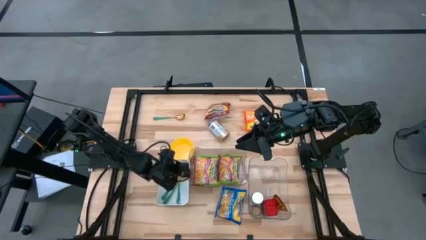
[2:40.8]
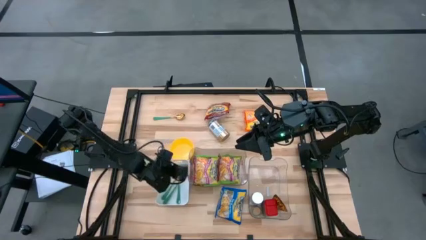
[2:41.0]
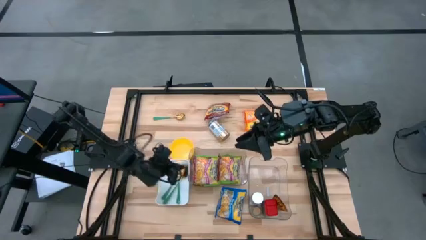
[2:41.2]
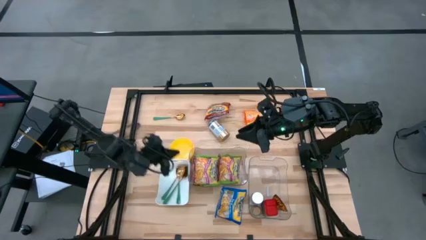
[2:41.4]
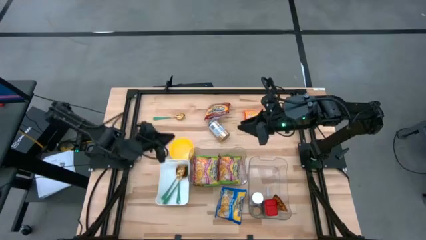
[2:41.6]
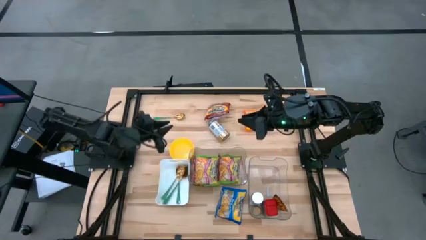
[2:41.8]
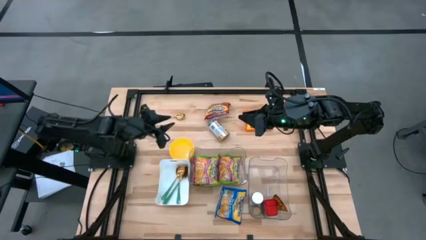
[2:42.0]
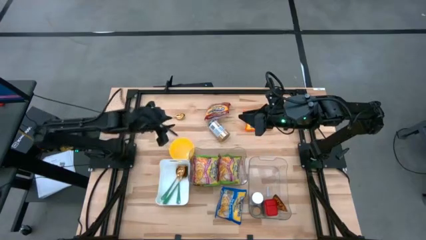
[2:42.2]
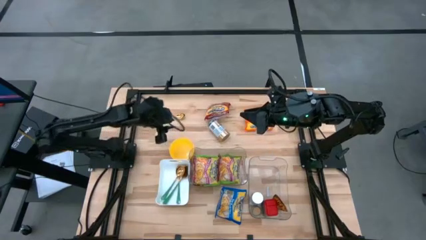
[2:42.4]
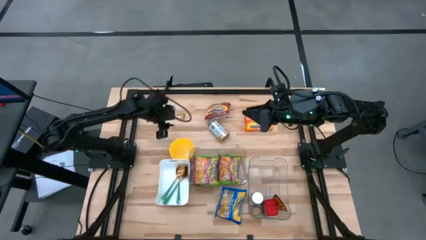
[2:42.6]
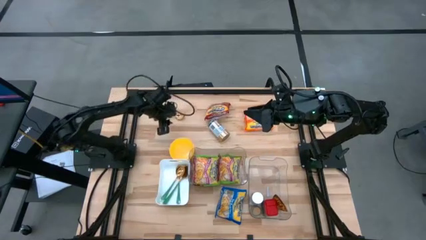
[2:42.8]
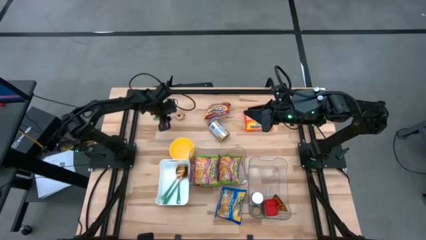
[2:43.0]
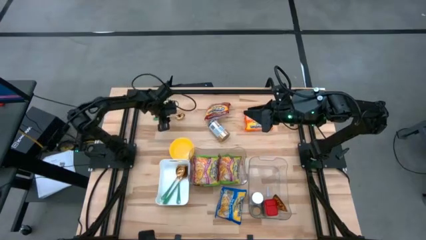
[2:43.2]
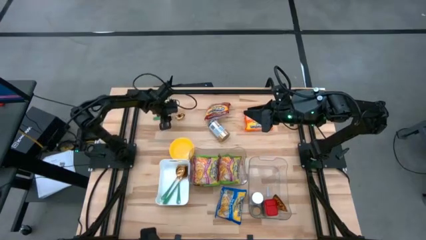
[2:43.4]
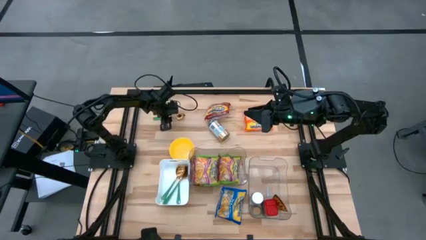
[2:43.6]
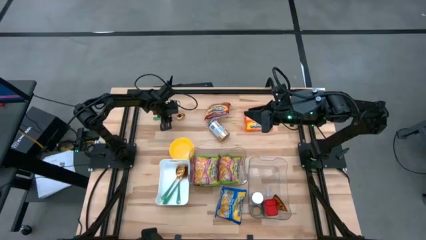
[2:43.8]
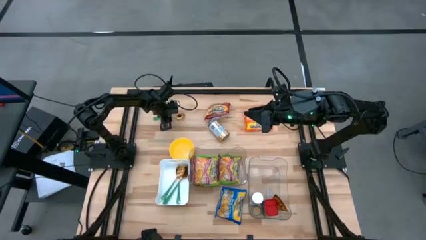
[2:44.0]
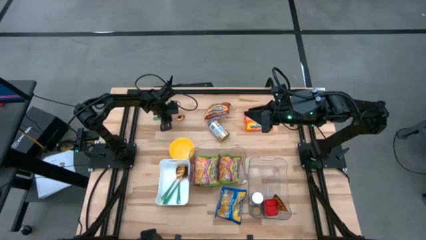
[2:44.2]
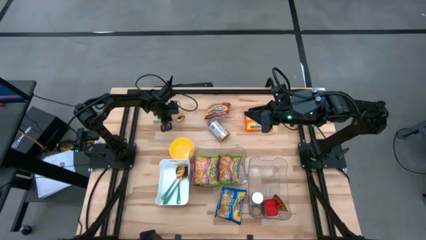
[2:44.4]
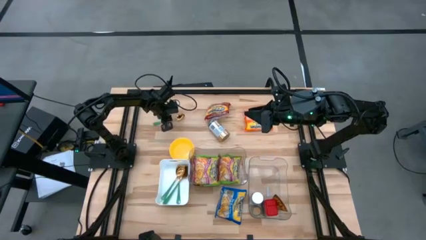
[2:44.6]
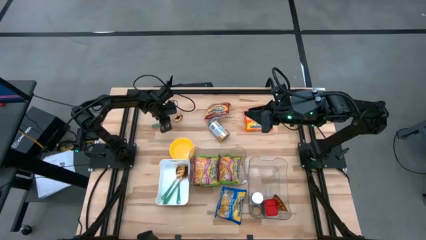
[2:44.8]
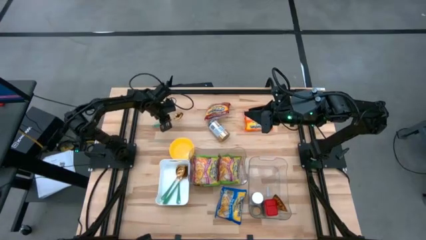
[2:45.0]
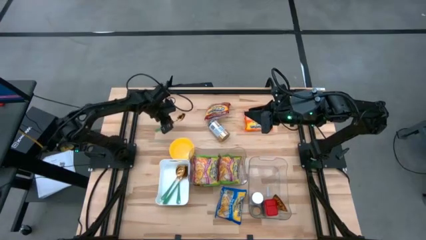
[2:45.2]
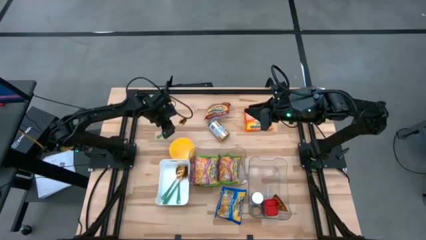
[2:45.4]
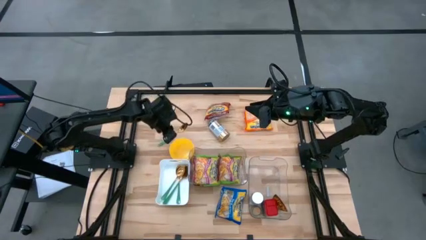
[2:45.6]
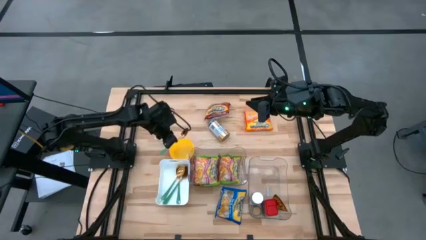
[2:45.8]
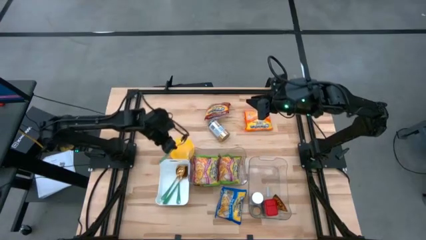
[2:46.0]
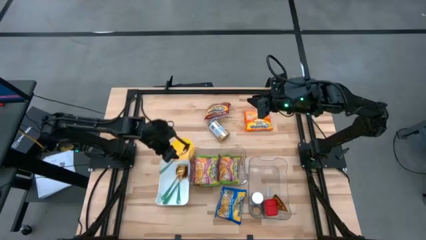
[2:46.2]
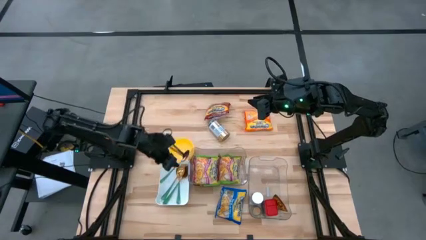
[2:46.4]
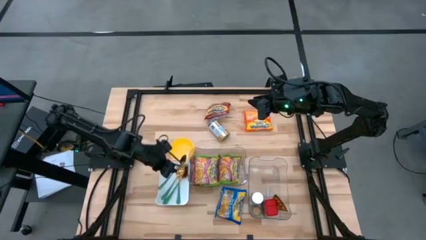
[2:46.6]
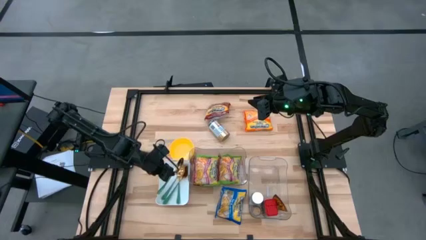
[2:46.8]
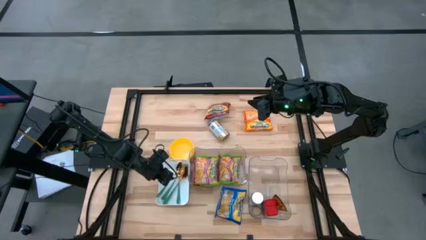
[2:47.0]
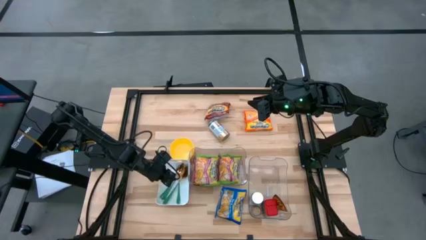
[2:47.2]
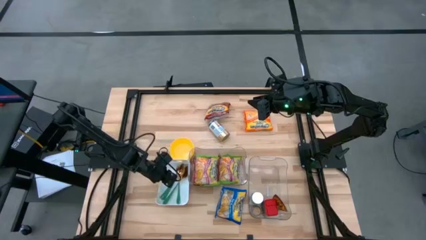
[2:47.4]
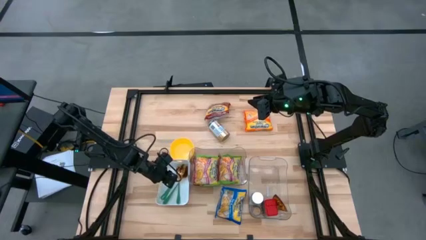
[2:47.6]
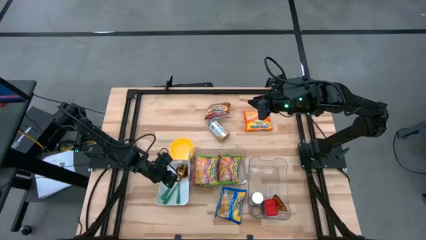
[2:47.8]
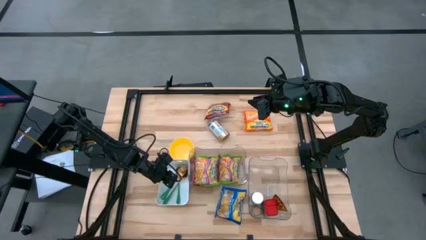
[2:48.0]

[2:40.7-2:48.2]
Task: Pick & Place Food Item
Put the green spoon into the white bin

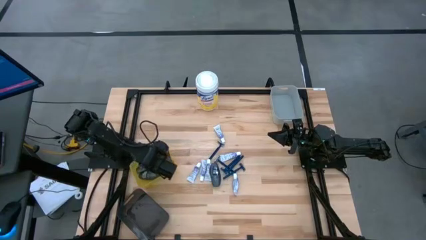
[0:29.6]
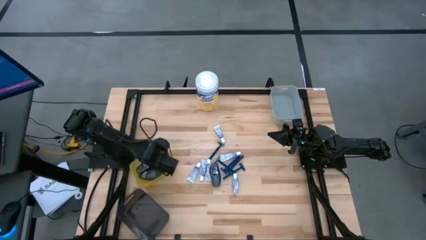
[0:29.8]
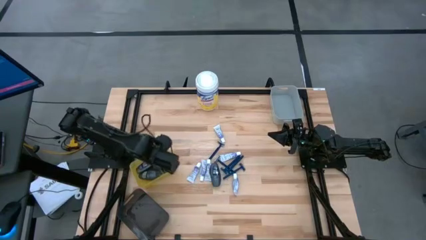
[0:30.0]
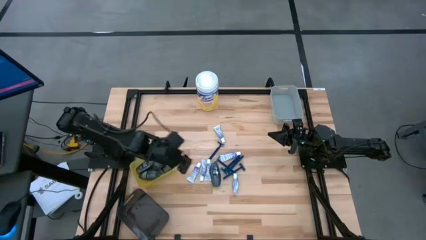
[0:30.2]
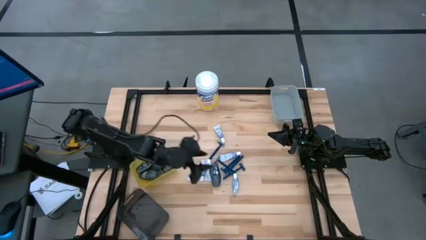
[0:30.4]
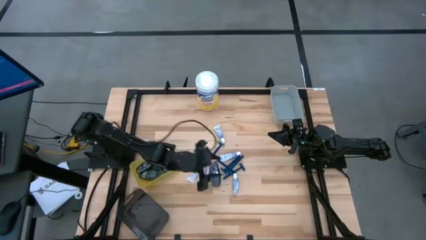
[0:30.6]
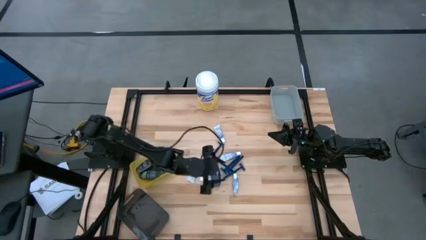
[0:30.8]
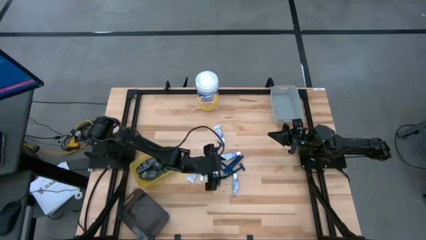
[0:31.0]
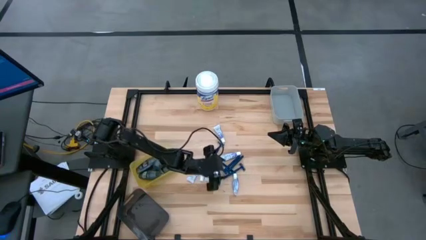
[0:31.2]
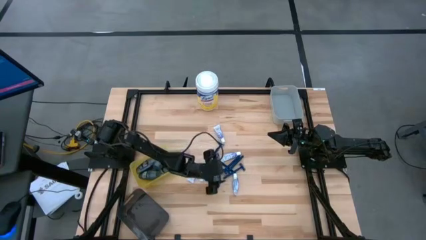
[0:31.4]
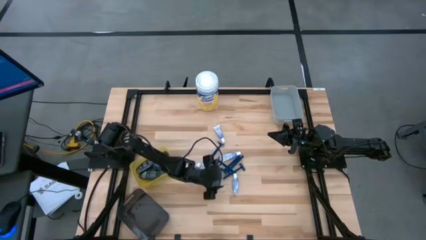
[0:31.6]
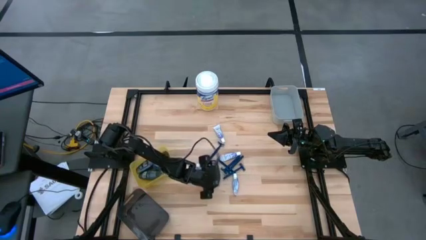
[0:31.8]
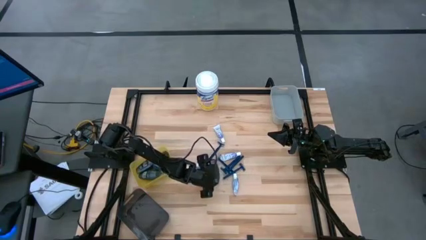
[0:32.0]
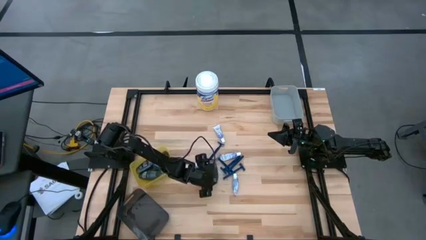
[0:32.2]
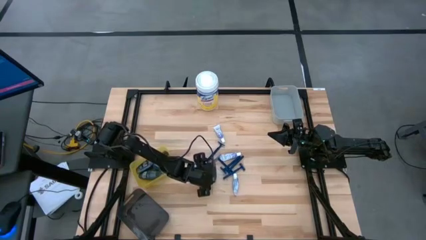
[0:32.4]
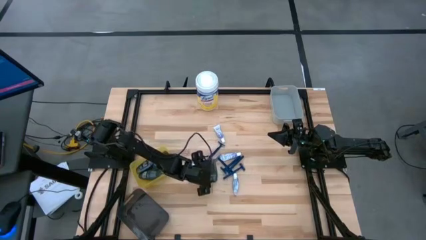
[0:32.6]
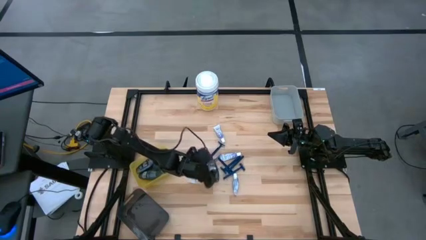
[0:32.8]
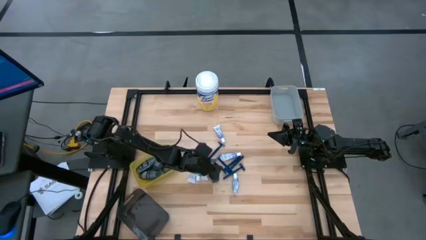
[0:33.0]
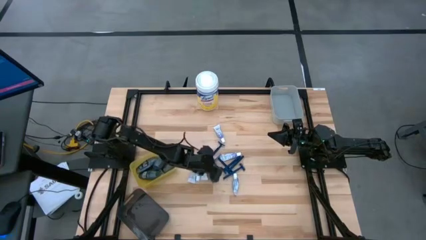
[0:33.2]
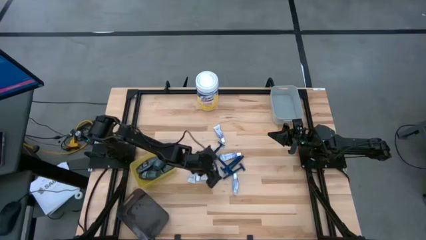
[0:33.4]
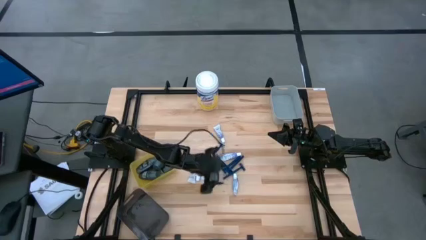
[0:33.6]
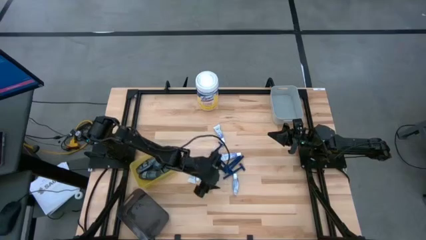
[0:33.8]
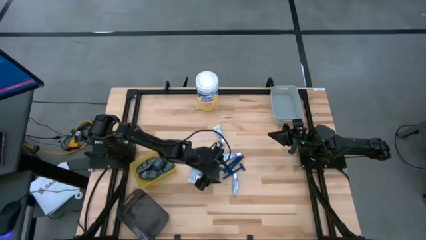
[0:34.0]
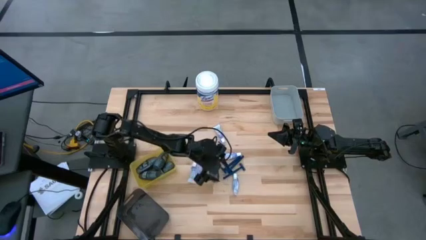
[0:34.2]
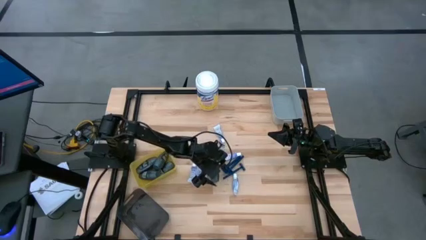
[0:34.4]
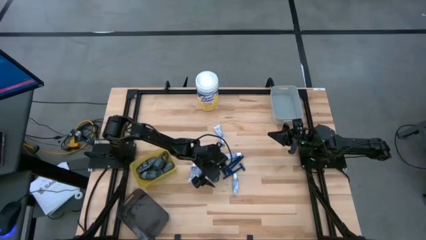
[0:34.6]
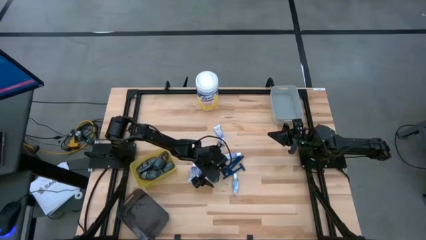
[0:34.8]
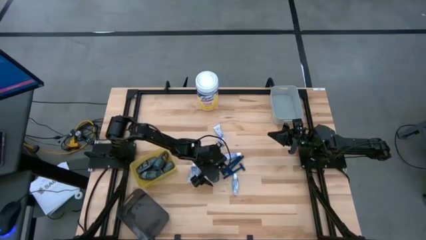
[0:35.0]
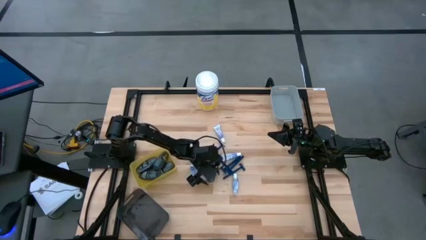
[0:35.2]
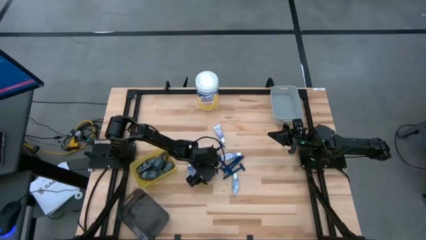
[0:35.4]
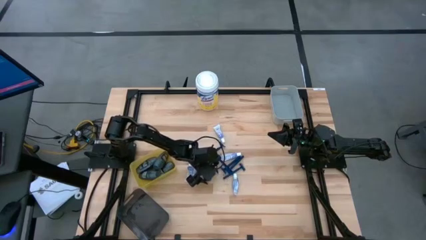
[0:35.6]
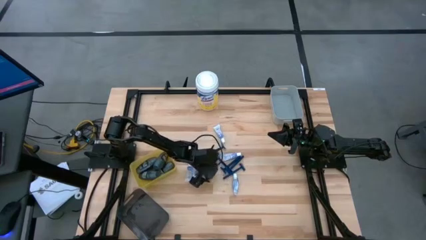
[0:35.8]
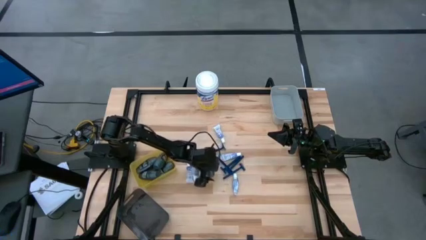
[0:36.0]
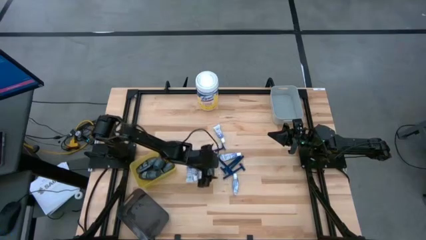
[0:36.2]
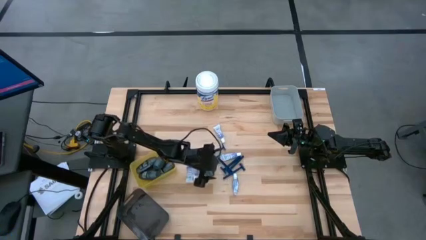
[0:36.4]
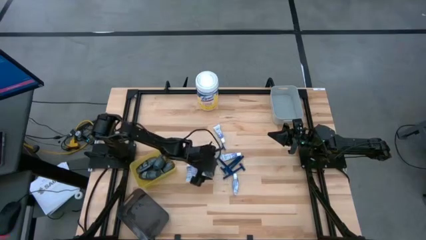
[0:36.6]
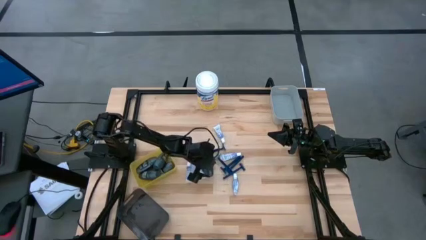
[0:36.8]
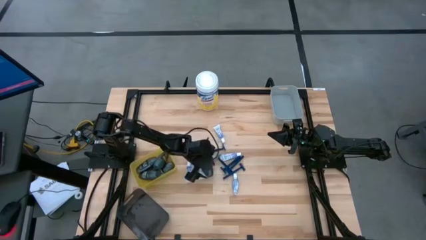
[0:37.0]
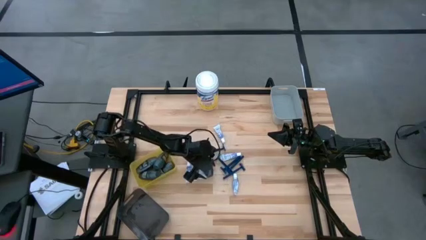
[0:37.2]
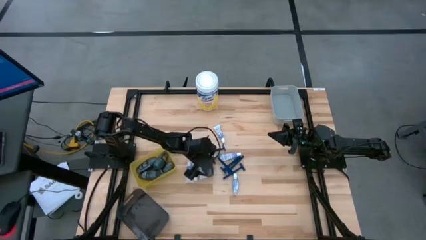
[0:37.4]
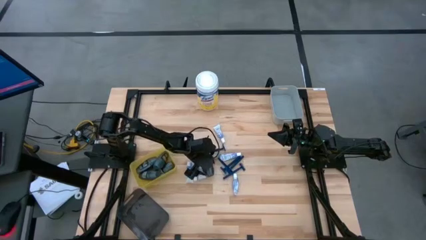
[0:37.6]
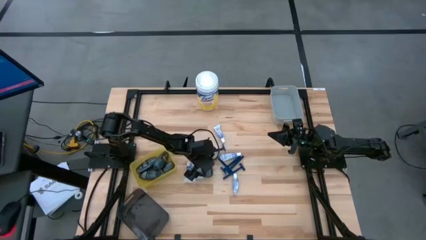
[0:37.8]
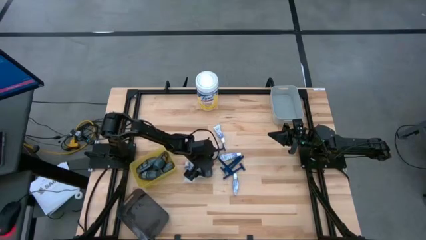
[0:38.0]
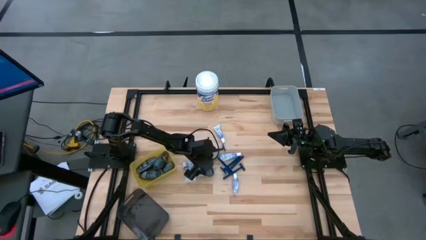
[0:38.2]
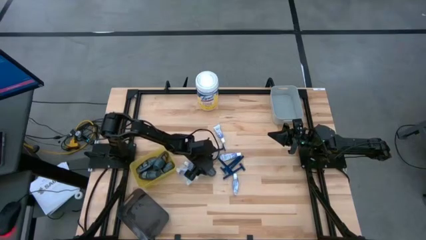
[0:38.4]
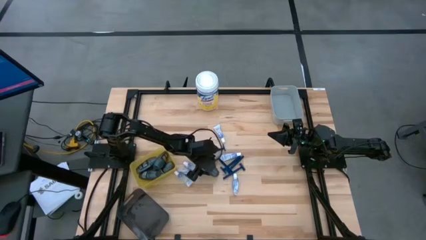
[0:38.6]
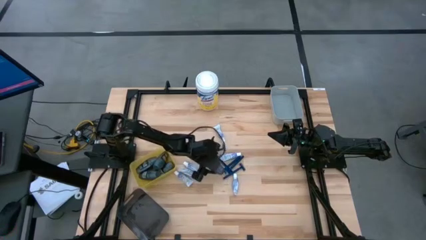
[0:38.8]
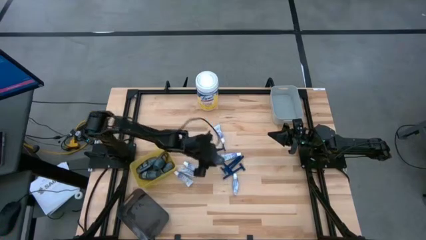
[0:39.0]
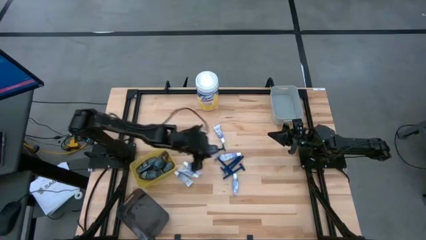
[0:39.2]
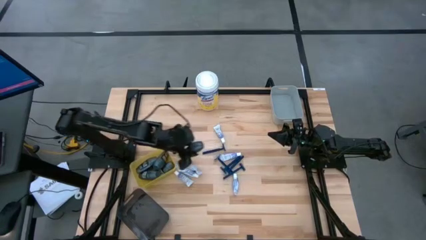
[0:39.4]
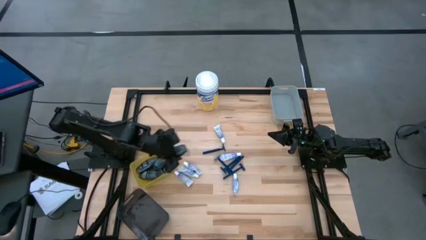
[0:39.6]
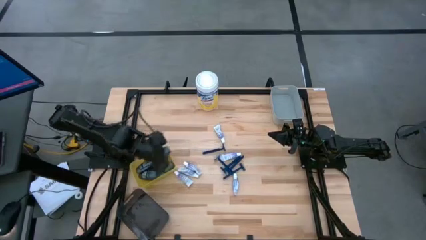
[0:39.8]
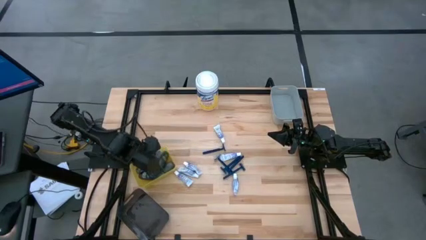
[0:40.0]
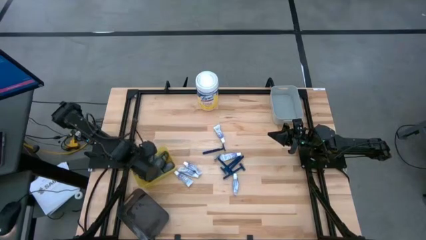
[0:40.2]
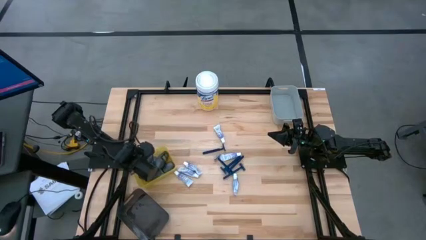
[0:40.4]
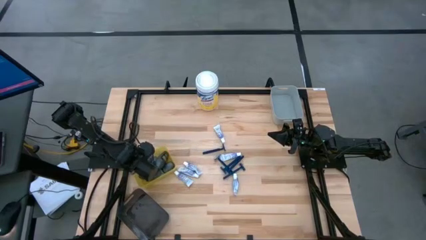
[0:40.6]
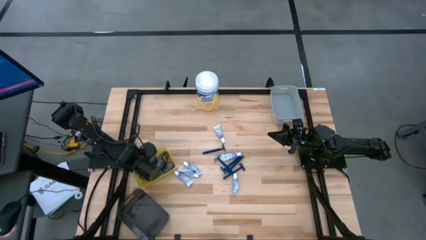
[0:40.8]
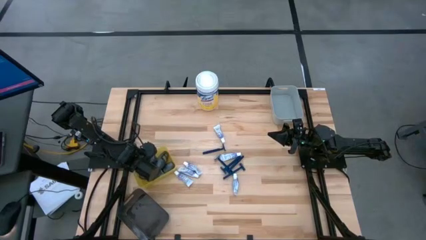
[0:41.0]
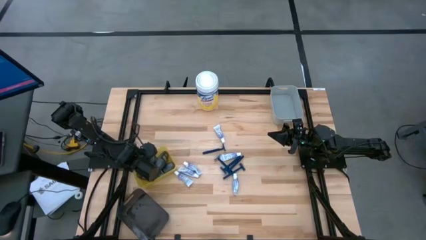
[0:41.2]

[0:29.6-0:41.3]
Task: Pick & Place Travel size toiletries
Put the black deodorant into the yellow bin
